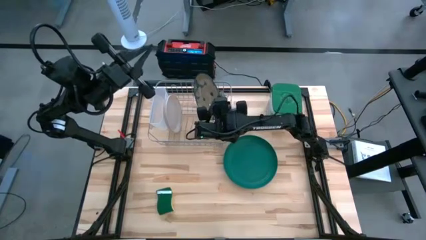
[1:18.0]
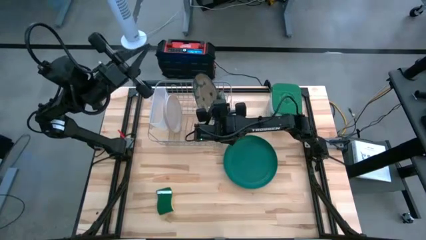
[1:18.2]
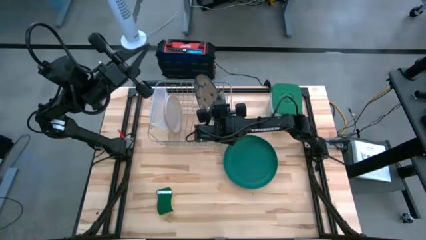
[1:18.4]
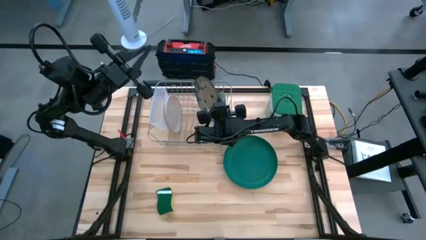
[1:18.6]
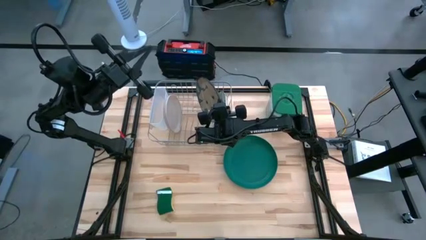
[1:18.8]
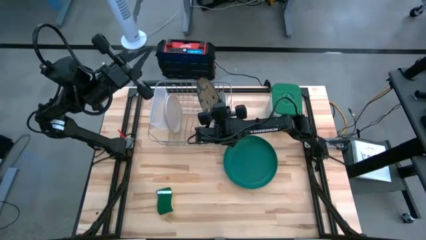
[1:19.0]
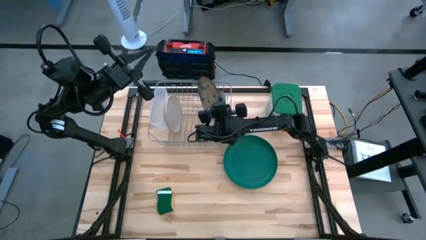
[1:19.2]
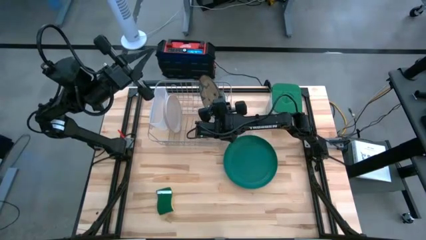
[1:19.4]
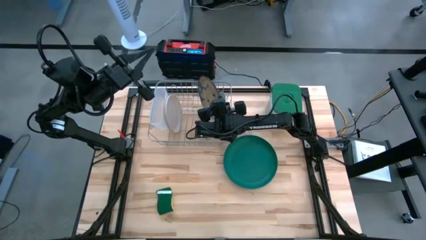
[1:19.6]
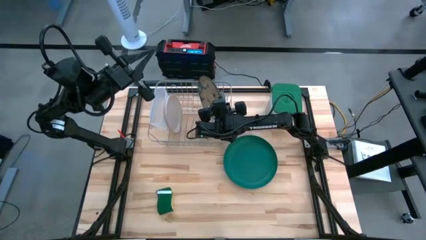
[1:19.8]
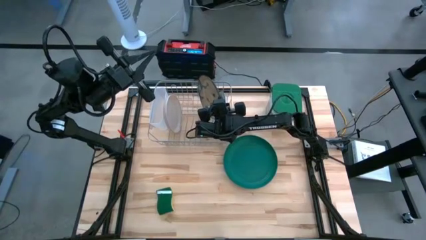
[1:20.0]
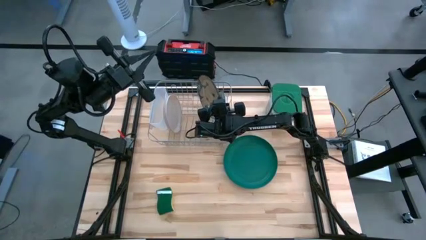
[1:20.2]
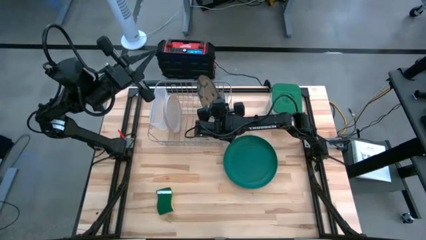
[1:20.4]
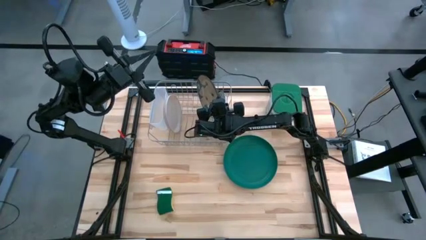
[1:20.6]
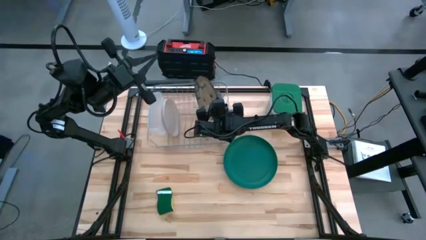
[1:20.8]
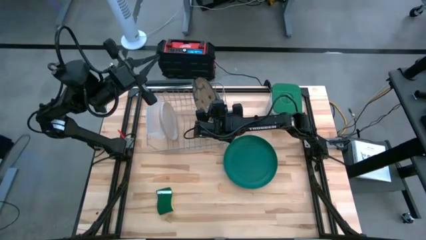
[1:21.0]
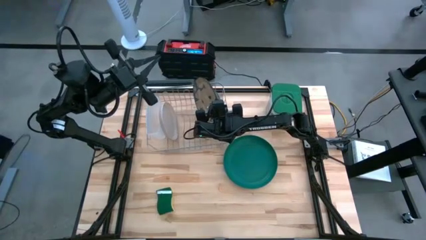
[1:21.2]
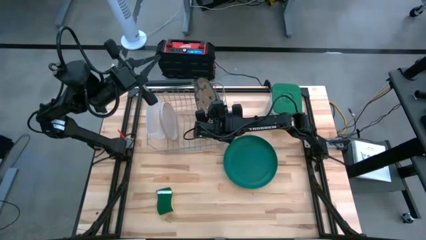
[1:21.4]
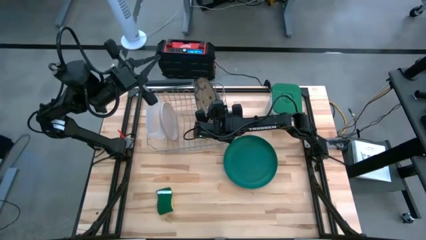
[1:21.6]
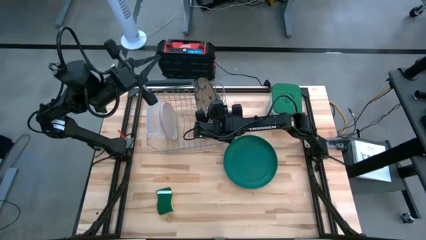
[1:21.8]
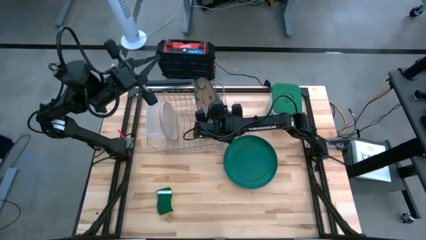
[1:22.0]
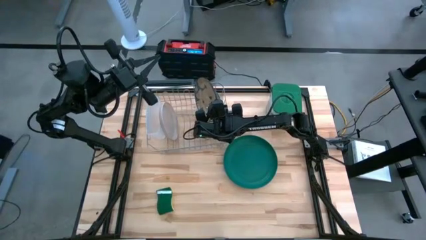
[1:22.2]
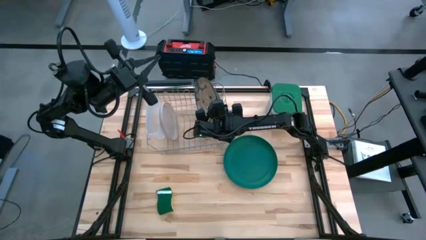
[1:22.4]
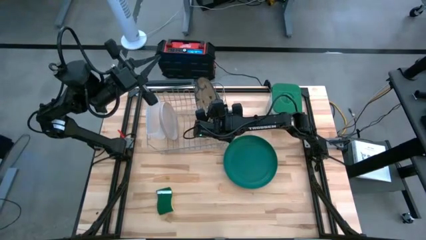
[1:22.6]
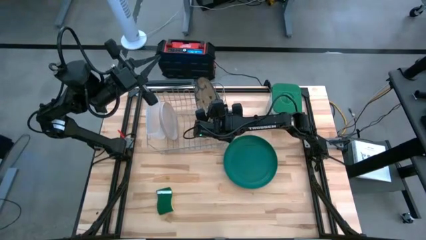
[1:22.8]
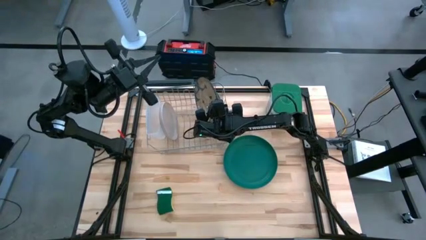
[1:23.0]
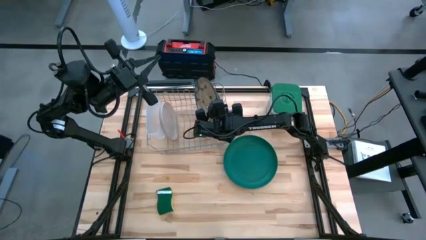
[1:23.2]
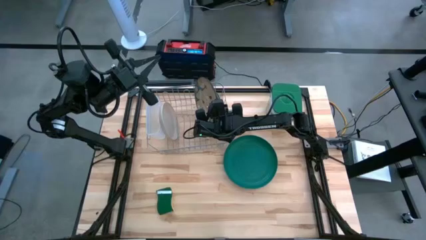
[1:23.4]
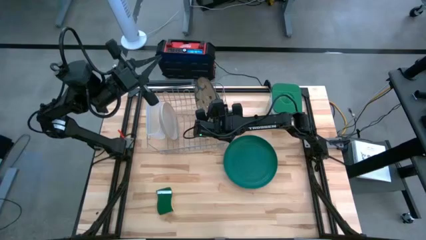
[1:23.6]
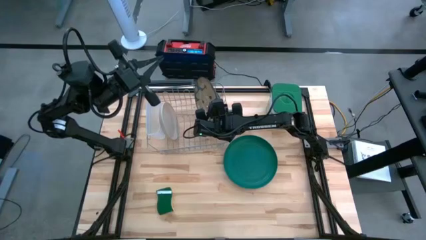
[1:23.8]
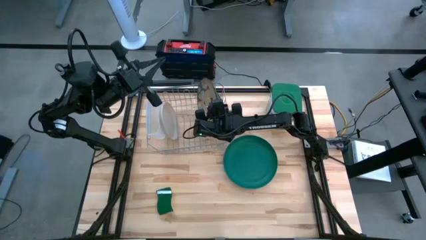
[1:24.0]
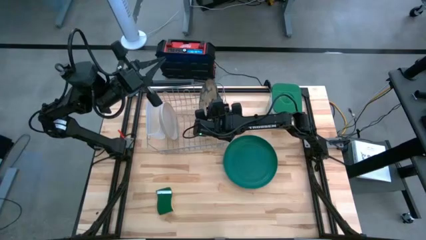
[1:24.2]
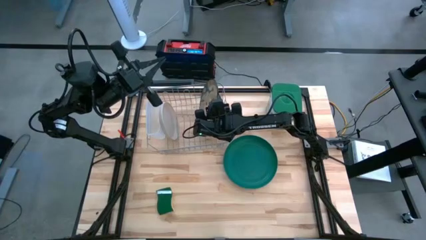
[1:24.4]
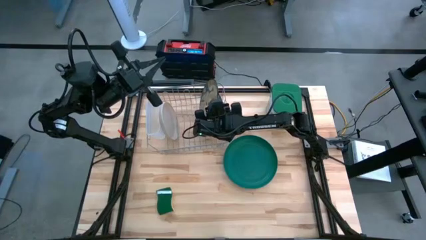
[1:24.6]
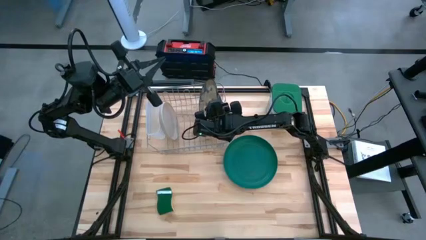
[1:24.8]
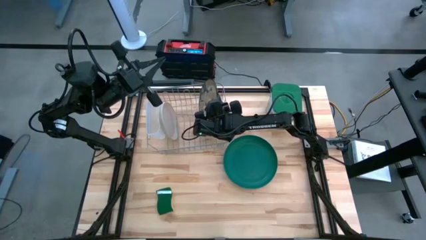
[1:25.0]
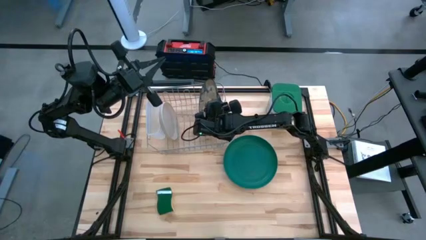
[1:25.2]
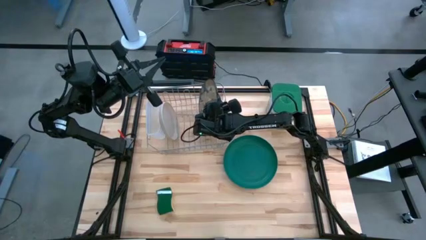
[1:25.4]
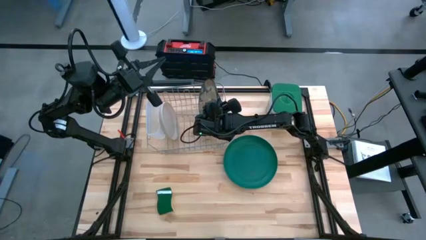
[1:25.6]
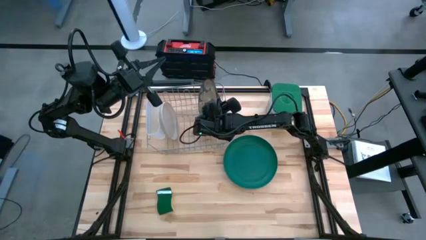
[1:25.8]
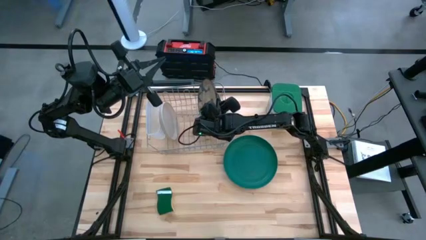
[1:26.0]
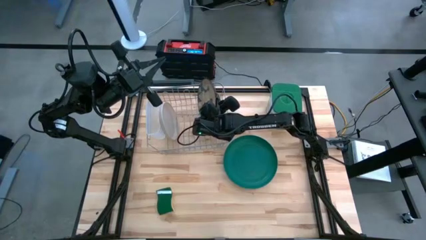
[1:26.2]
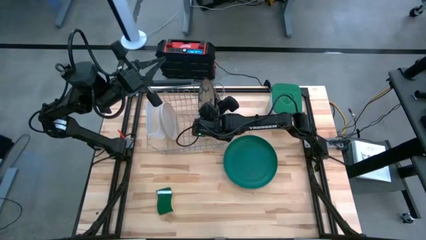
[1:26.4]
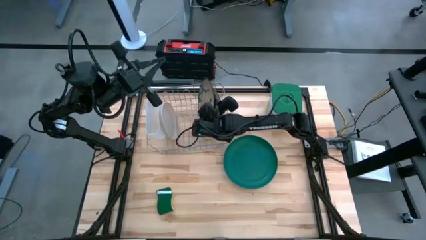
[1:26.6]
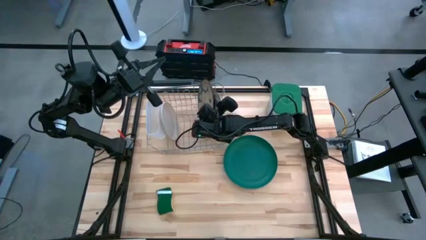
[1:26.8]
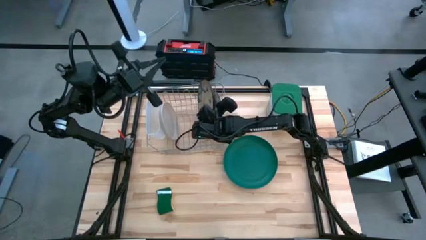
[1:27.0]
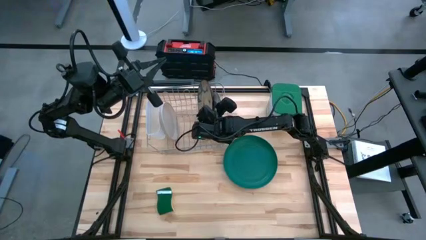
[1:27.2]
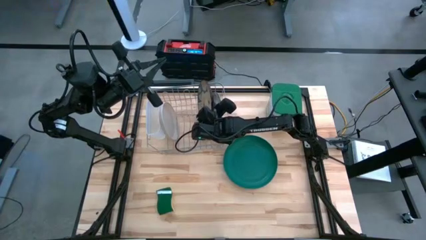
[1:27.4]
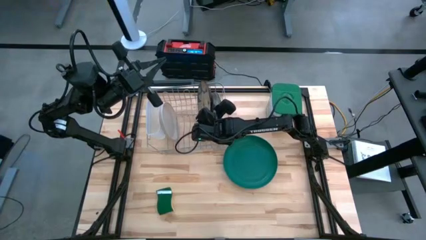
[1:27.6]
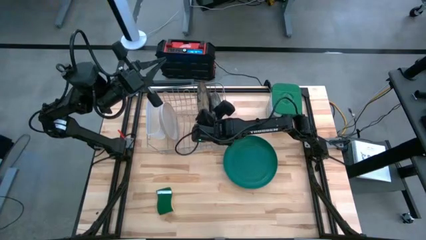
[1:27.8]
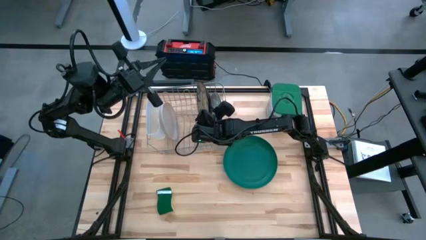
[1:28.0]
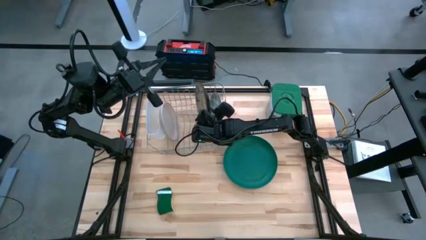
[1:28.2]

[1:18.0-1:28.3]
Task: Sort dishes
Put the white patterned plate on the dish rack

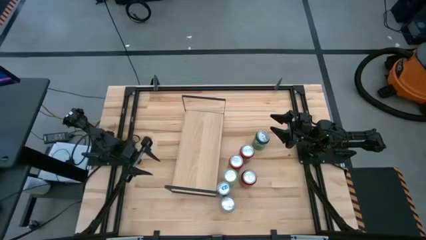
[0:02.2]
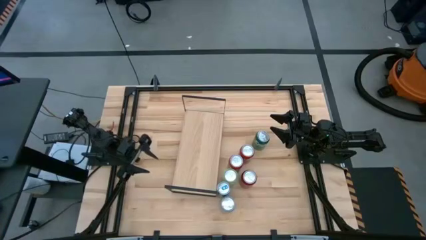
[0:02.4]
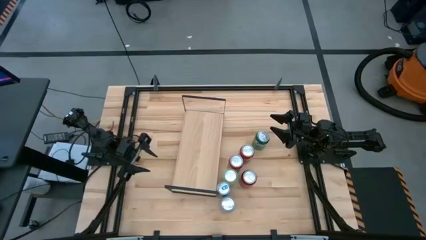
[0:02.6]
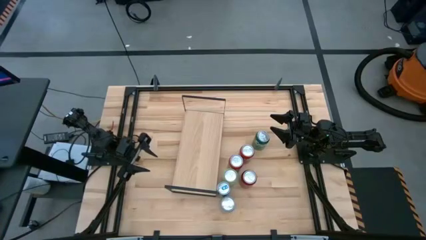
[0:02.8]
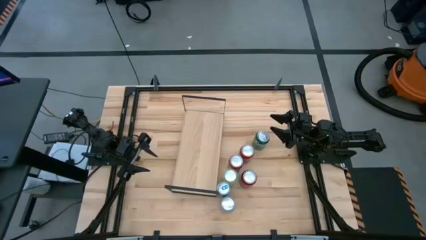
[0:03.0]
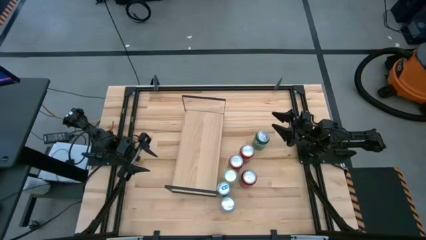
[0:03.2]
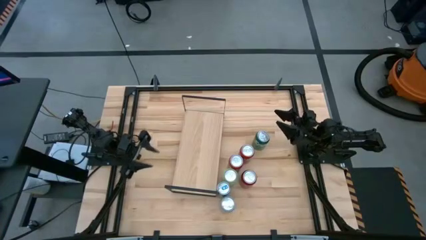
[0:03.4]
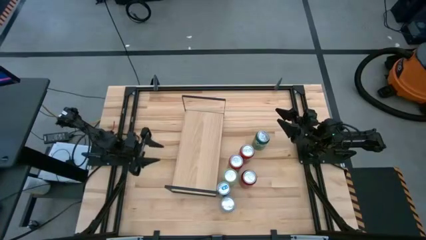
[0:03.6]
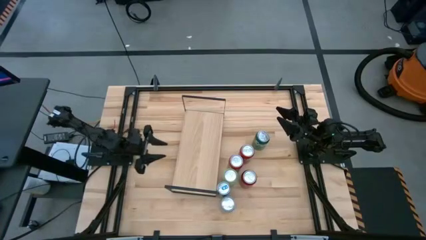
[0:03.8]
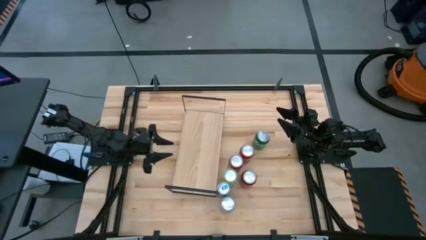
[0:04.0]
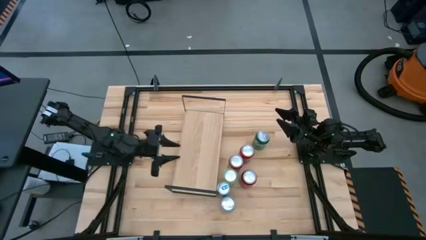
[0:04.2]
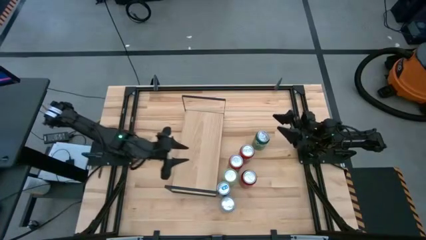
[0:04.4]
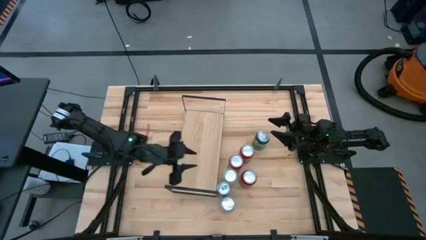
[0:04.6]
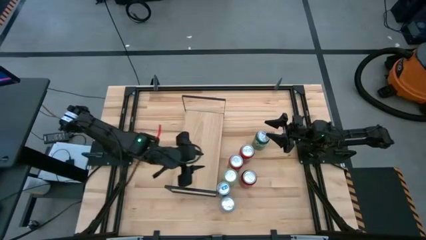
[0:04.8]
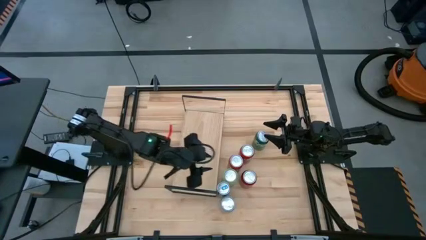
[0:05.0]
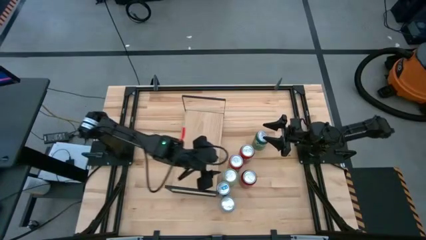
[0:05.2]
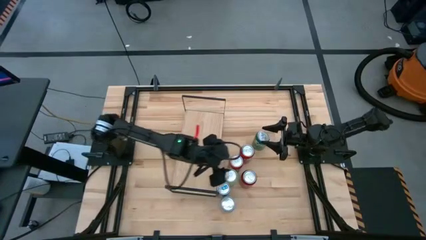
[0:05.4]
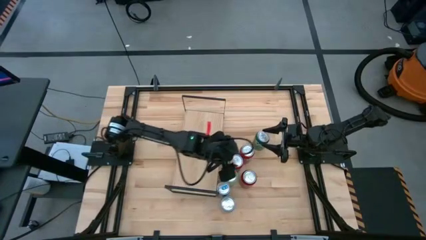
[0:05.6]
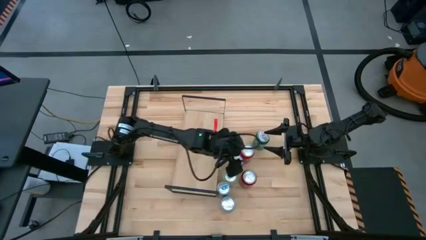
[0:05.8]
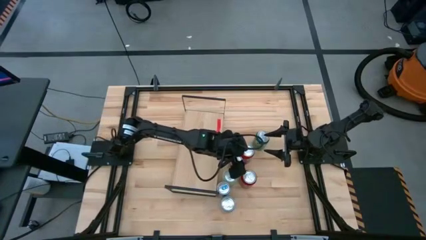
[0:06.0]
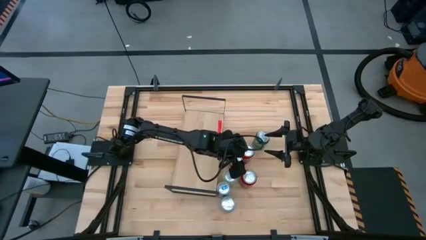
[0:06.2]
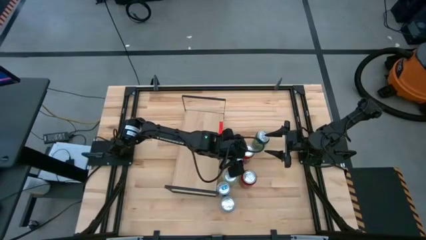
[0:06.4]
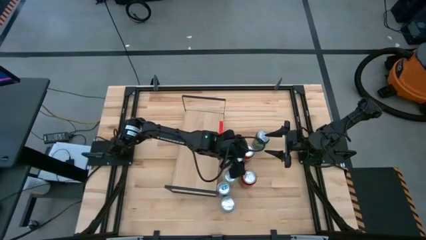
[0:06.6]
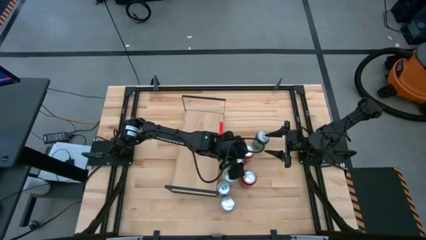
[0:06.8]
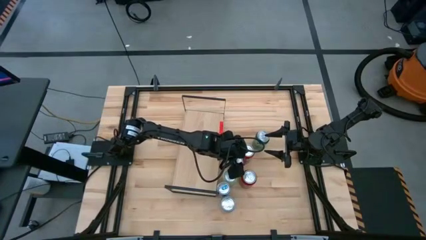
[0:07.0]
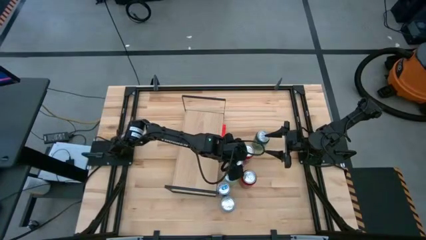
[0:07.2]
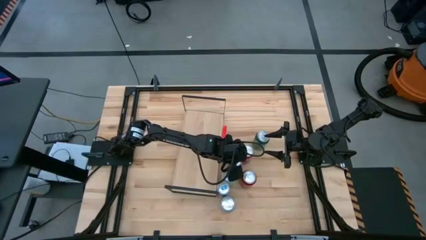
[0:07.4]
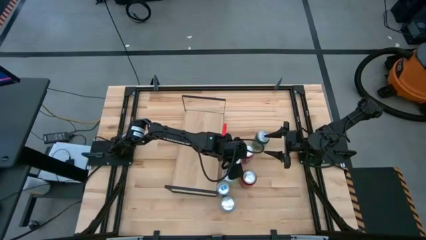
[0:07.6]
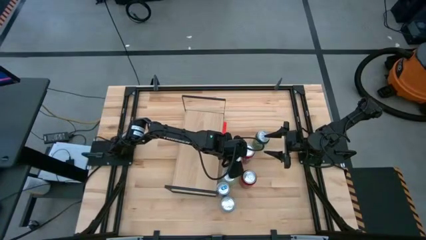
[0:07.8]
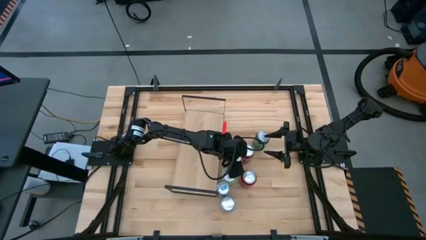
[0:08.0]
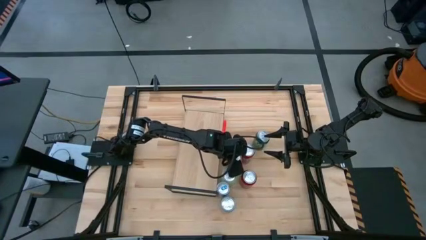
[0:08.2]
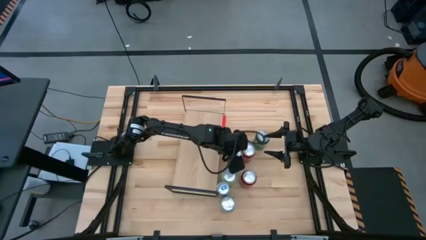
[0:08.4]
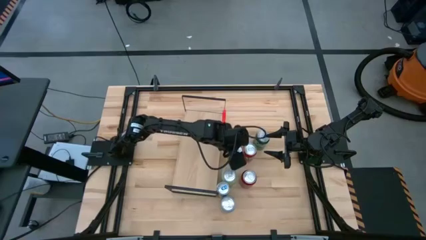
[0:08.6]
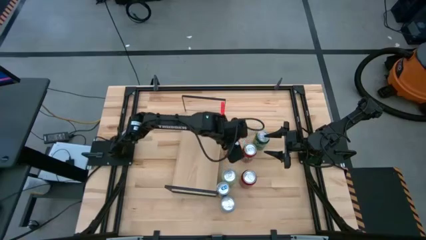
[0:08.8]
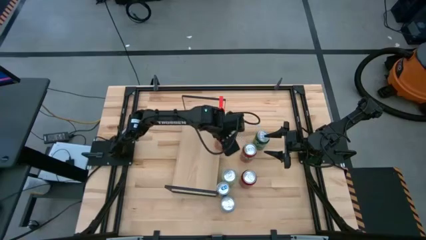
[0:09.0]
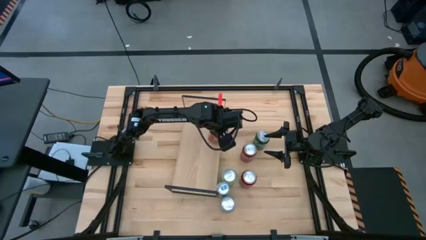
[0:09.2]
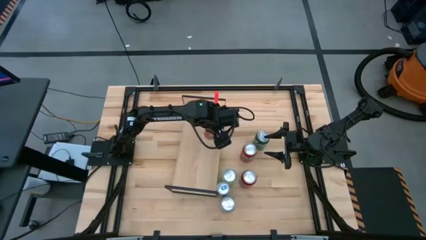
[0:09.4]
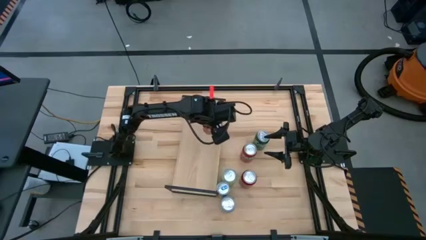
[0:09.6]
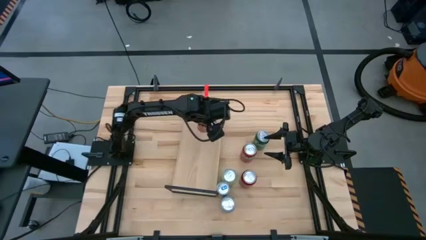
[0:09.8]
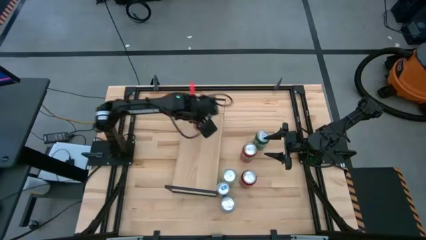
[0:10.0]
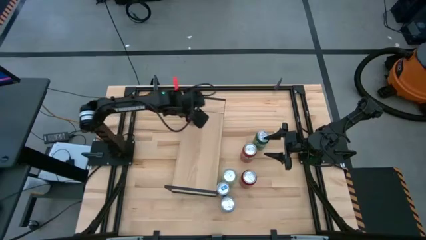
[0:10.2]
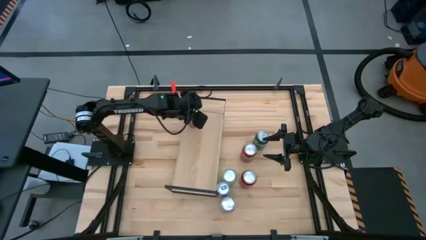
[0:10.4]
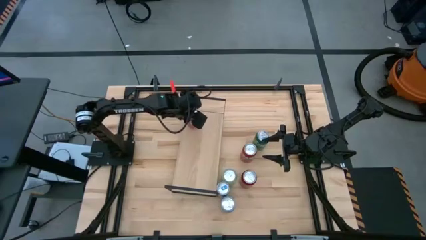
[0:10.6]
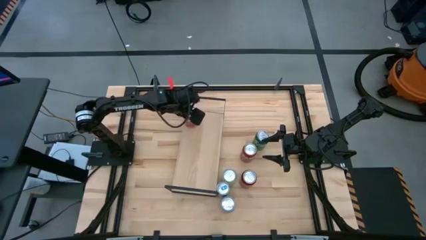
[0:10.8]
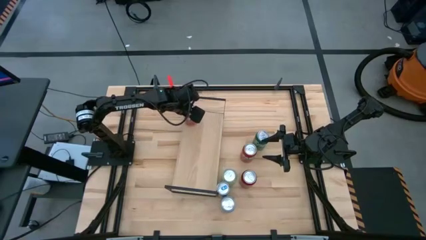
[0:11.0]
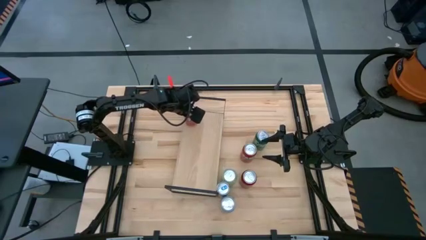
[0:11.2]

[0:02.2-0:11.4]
Task: Place canned beverage on shelf
Put the bottom red soda can on the shelf
